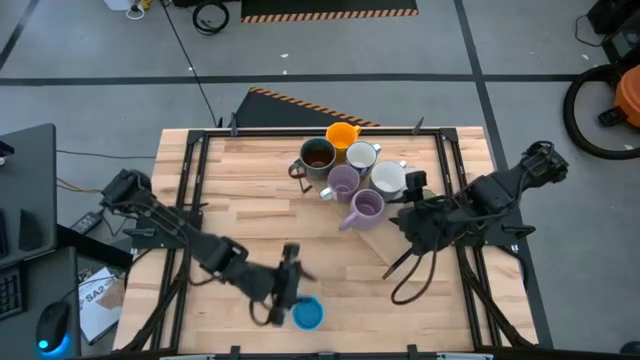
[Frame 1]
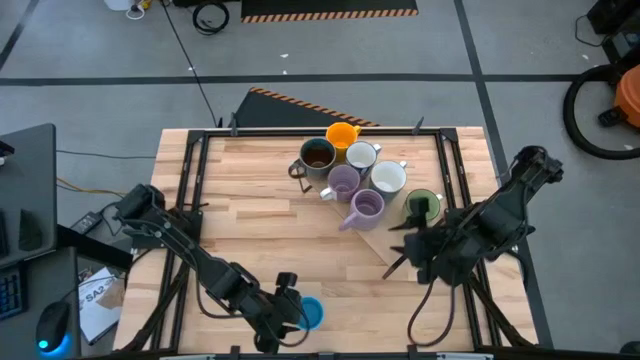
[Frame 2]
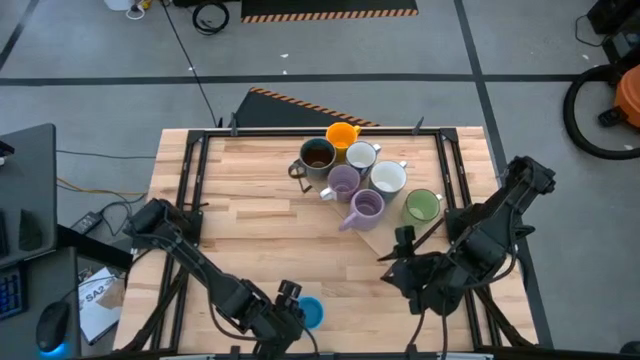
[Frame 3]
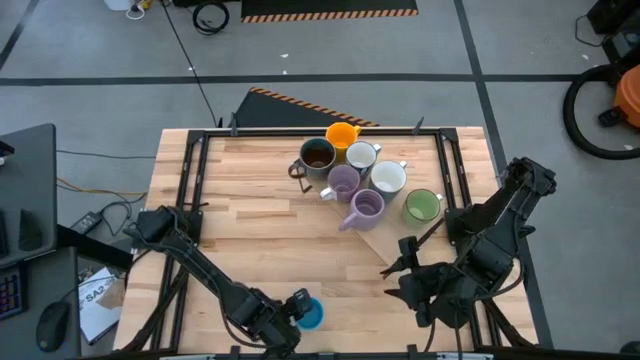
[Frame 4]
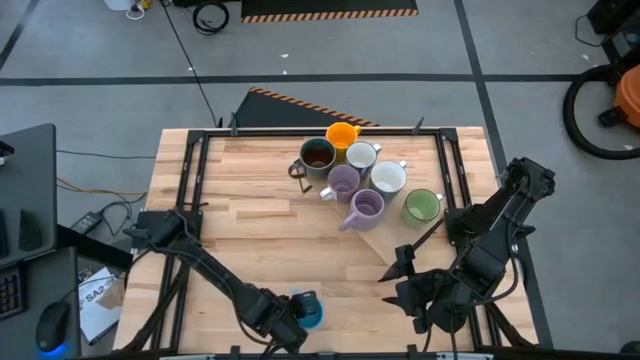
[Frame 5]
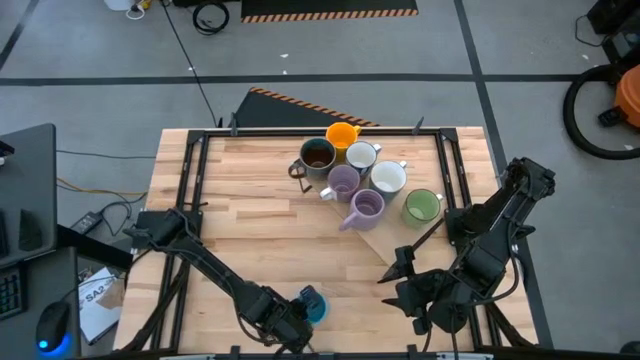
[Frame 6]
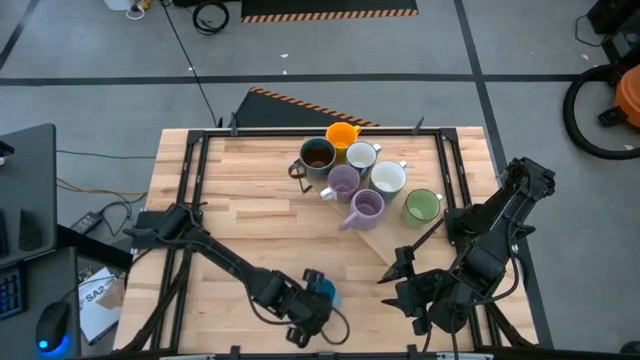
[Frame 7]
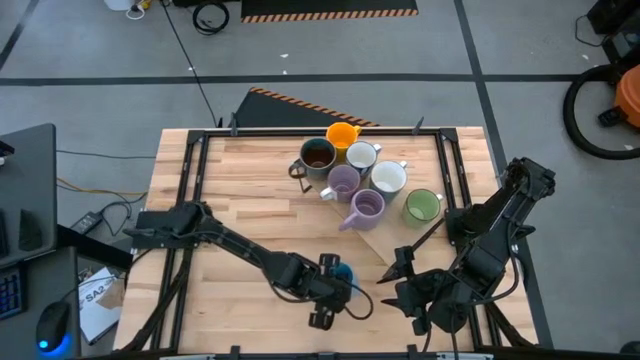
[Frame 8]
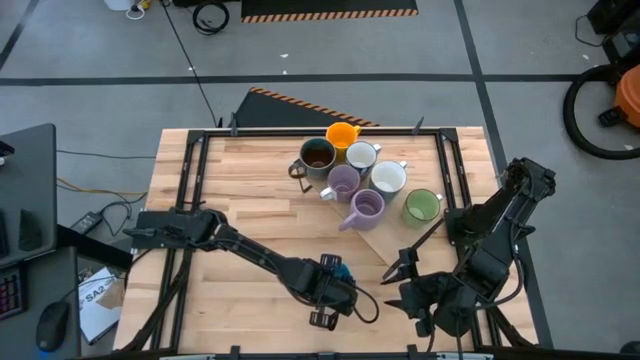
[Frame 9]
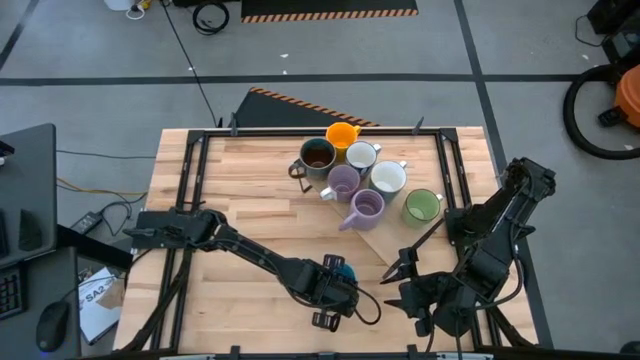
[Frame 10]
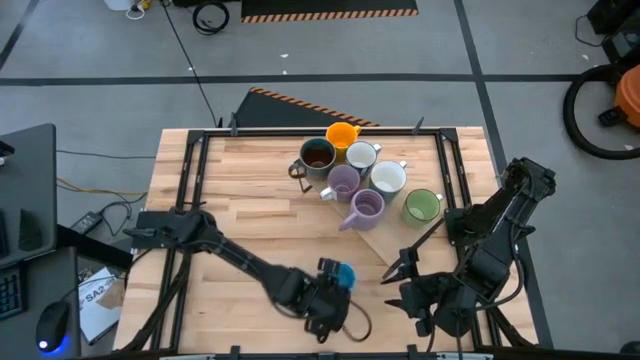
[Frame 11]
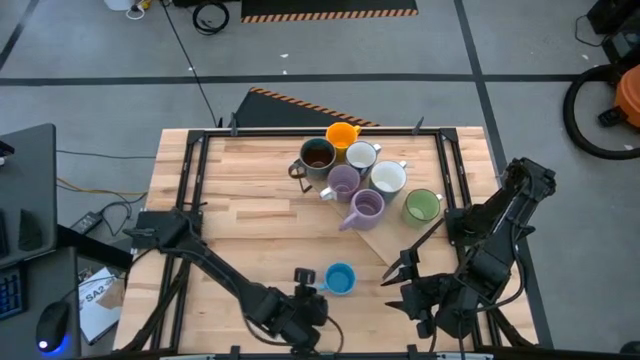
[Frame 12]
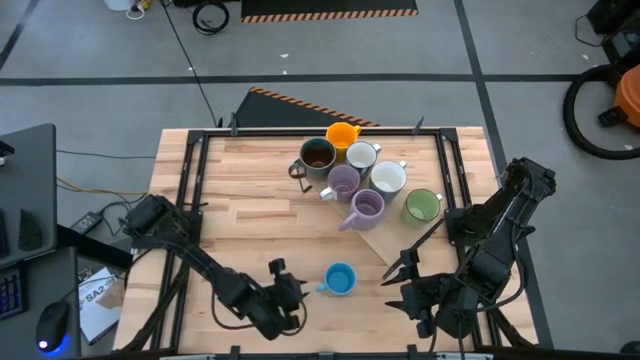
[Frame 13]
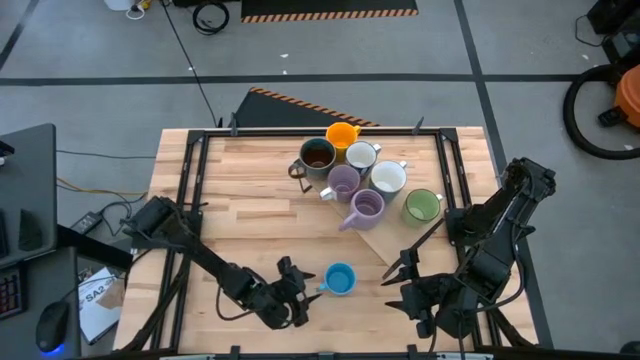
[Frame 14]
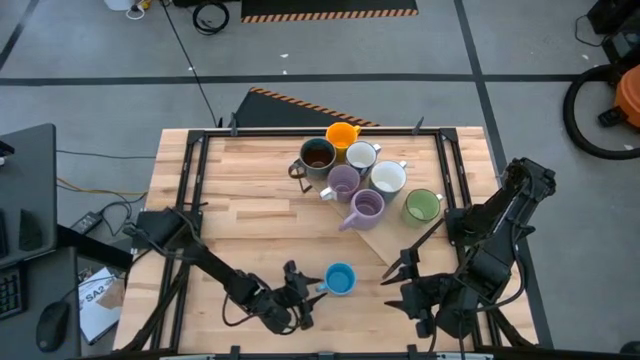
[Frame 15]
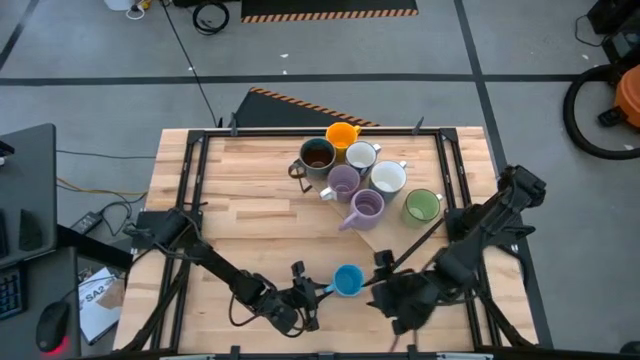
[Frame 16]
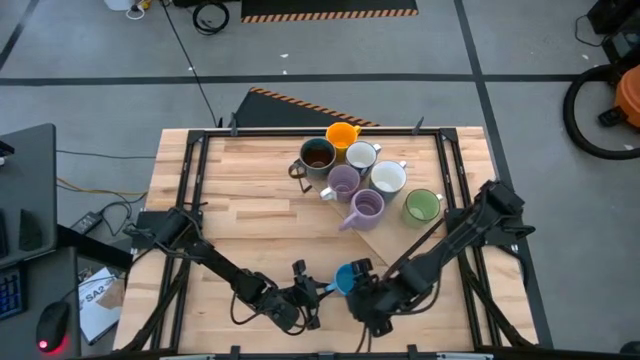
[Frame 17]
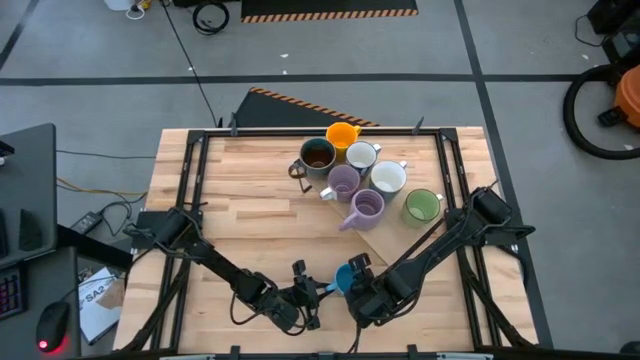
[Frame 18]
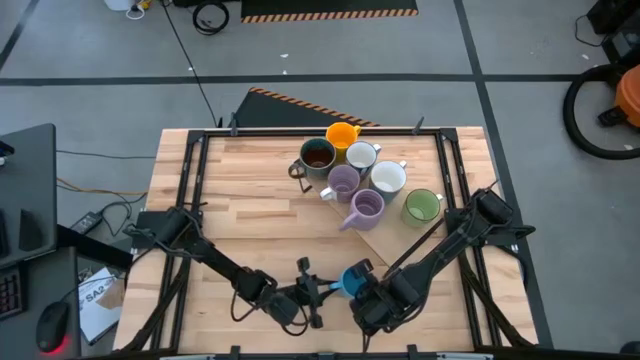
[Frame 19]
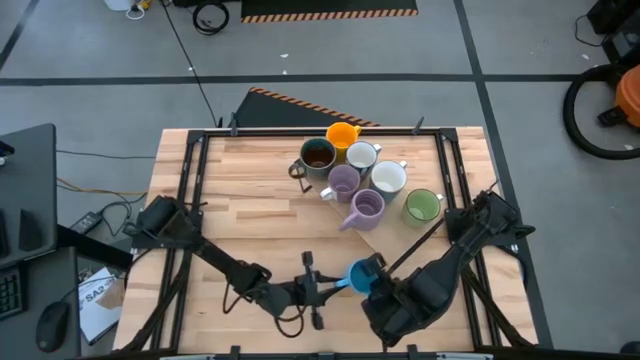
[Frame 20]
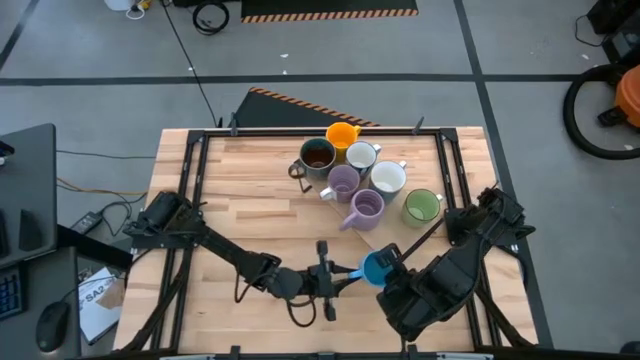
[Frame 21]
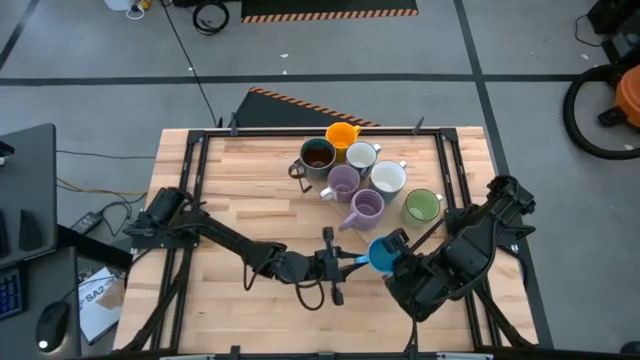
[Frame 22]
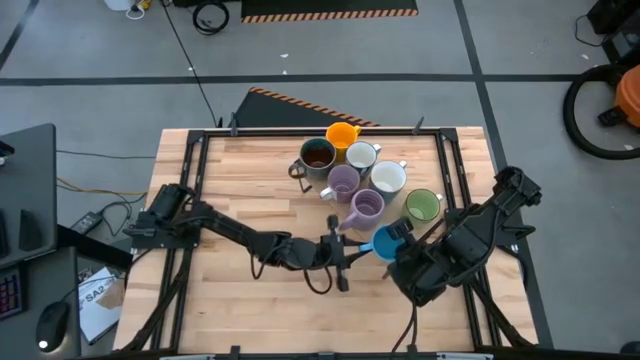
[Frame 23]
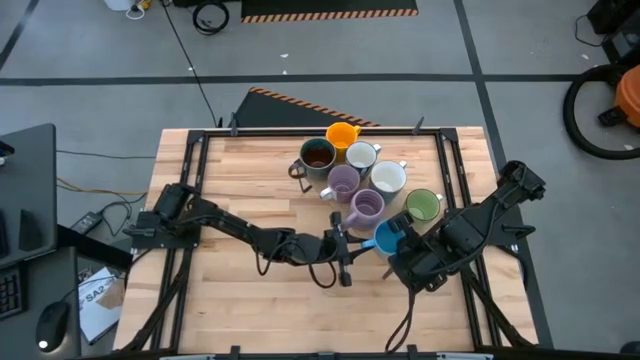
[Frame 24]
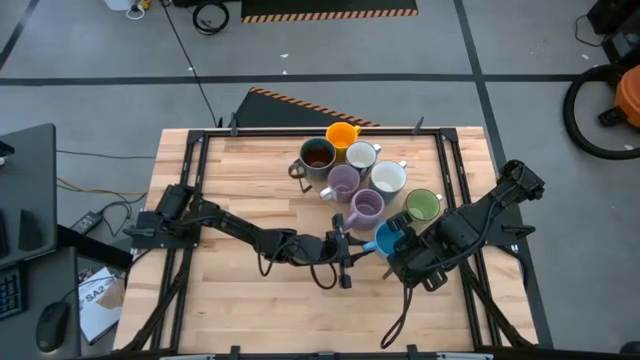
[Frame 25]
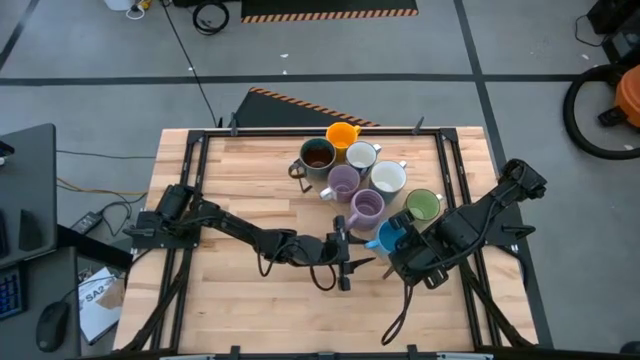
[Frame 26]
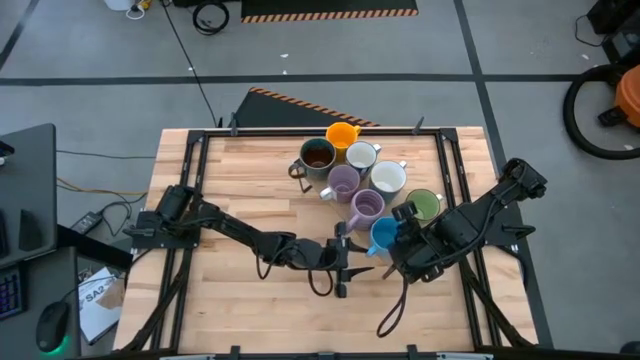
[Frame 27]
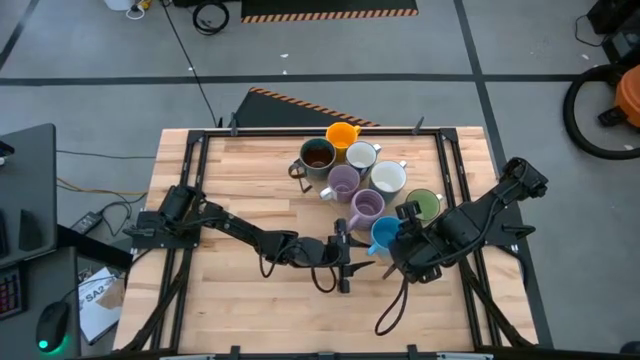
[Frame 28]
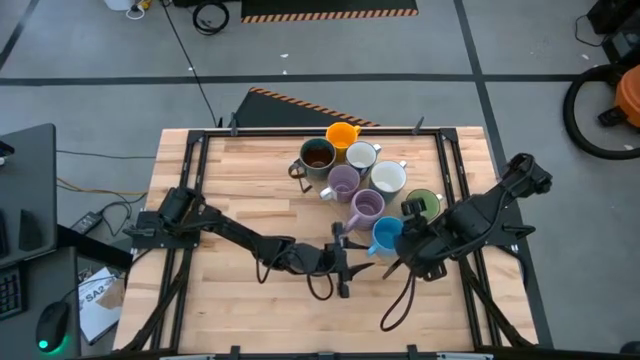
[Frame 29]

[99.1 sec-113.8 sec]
Task: Place coffee mugs
Put the blue mug on the shelf

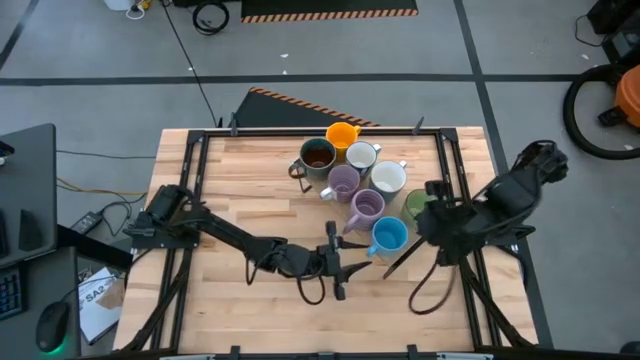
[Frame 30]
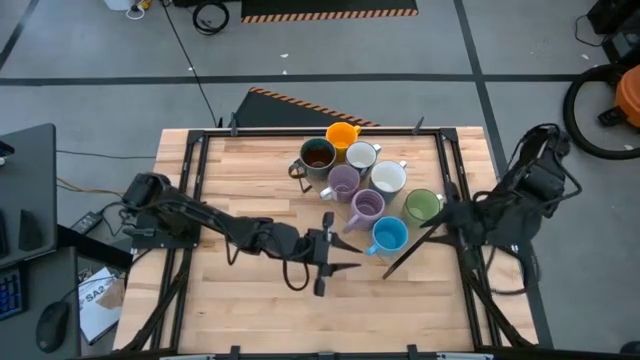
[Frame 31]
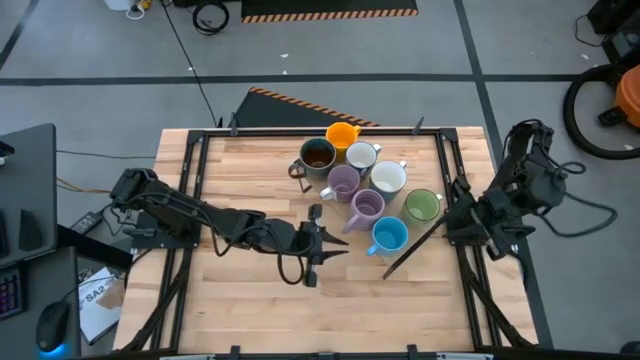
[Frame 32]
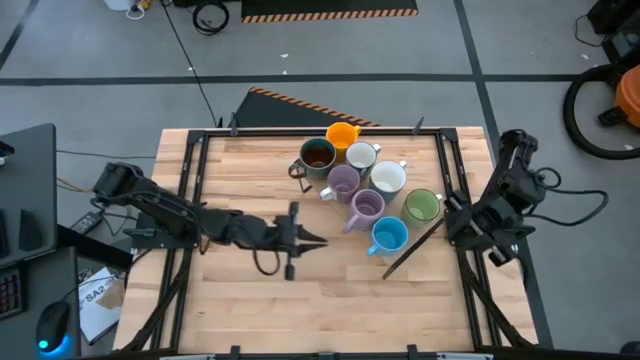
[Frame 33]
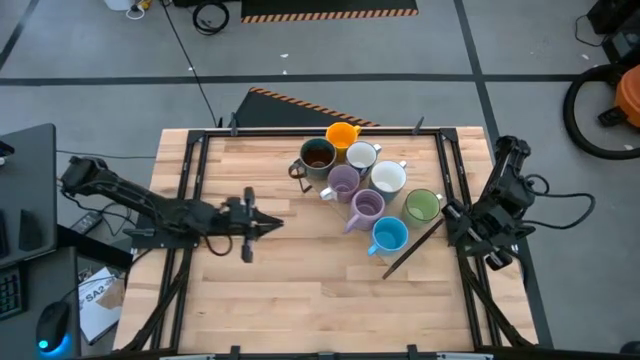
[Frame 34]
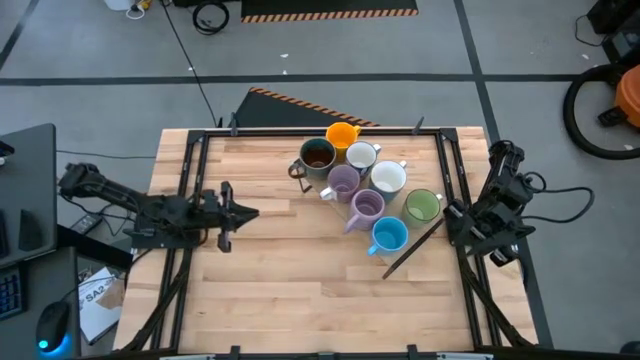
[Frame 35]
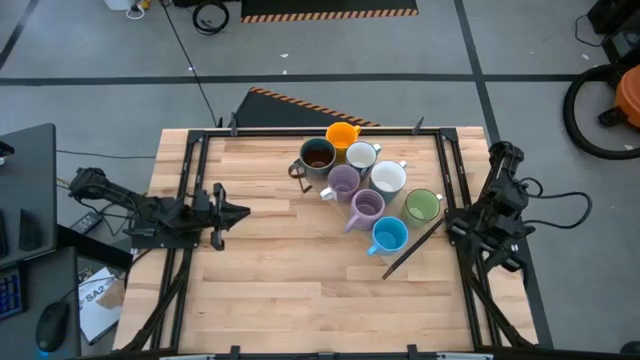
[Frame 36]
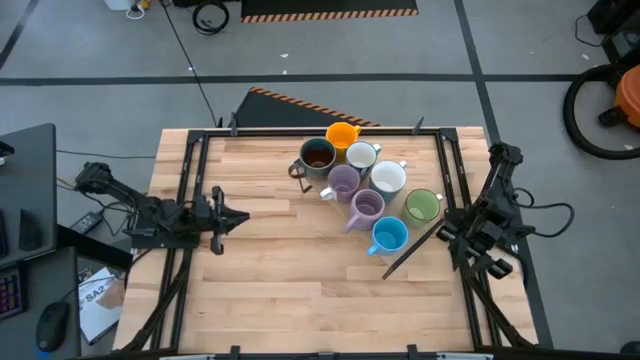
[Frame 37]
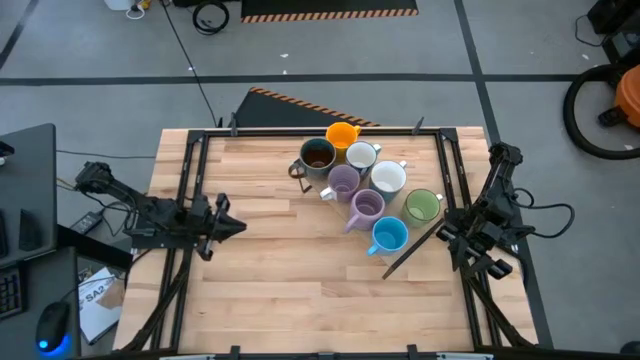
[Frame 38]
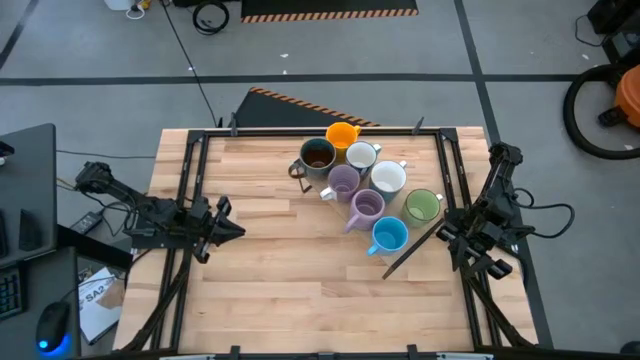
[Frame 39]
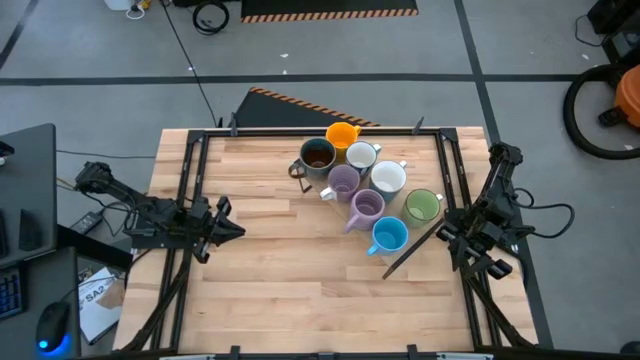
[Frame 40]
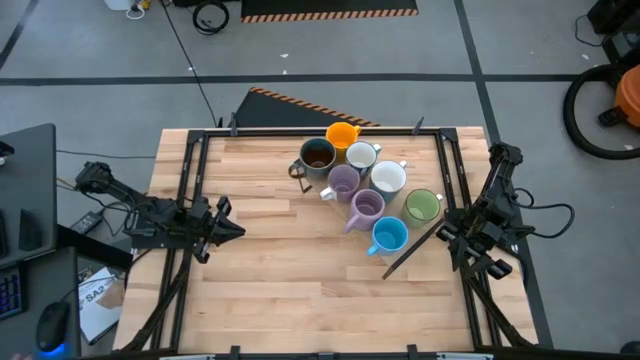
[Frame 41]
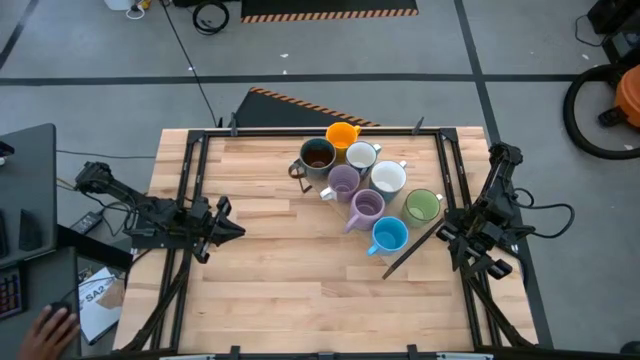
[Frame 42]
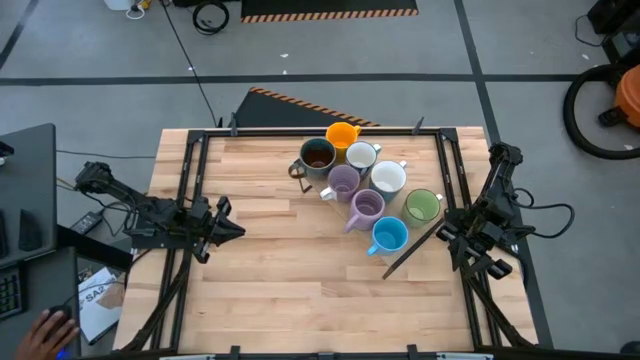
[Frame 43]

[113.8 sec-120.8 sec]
Return to Home Position
